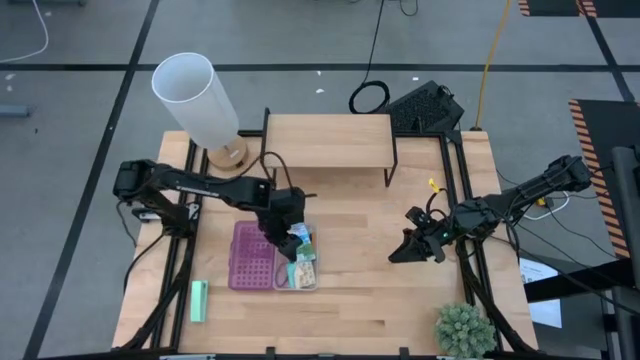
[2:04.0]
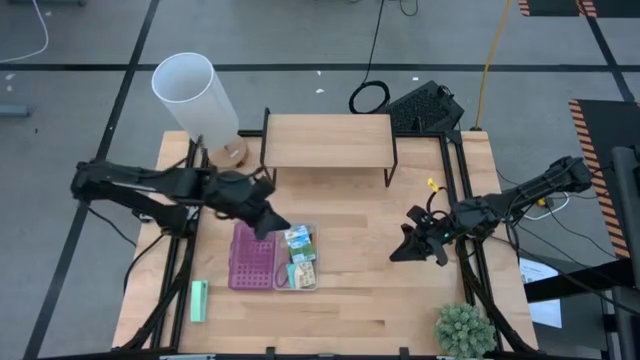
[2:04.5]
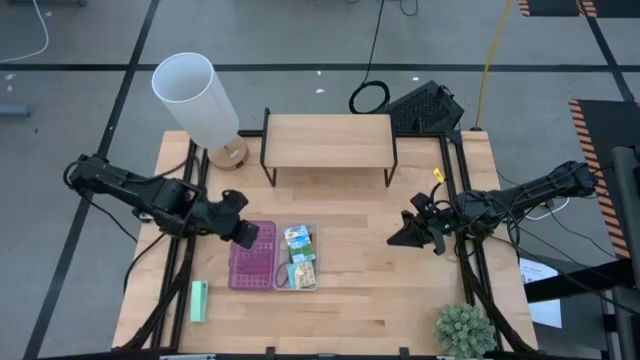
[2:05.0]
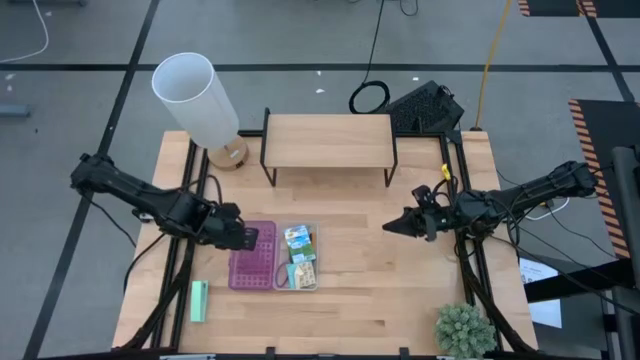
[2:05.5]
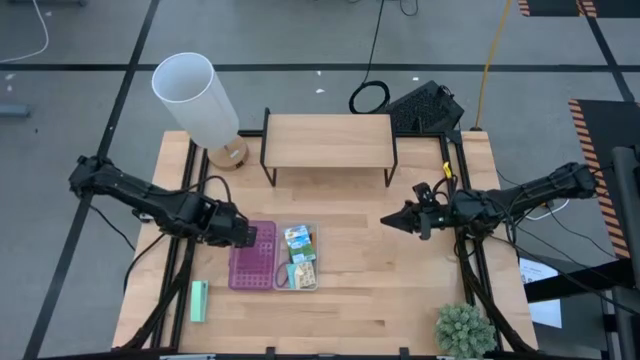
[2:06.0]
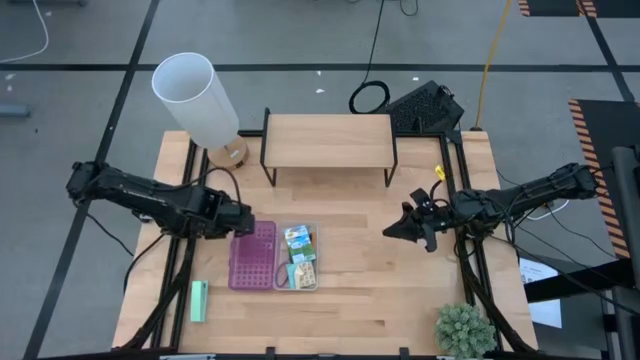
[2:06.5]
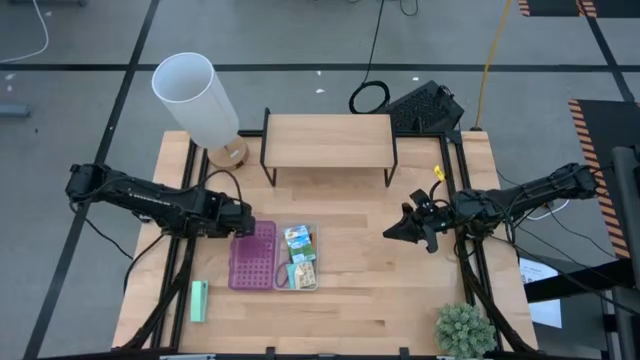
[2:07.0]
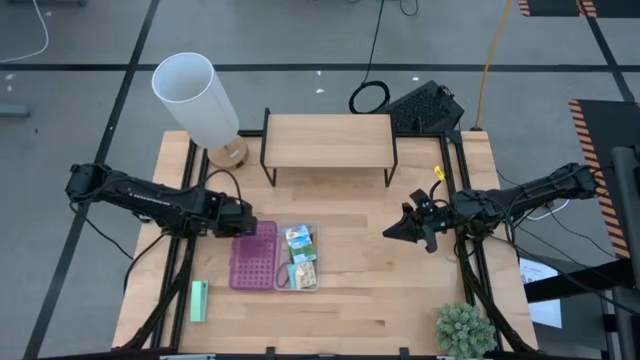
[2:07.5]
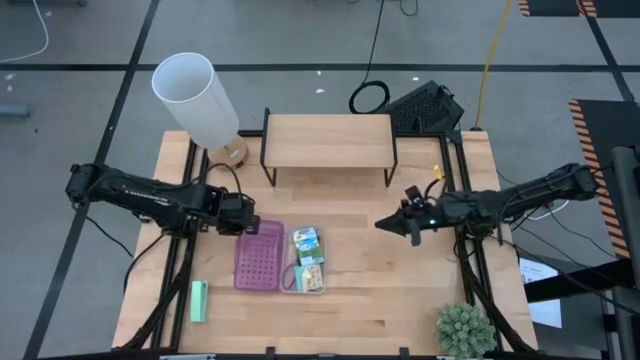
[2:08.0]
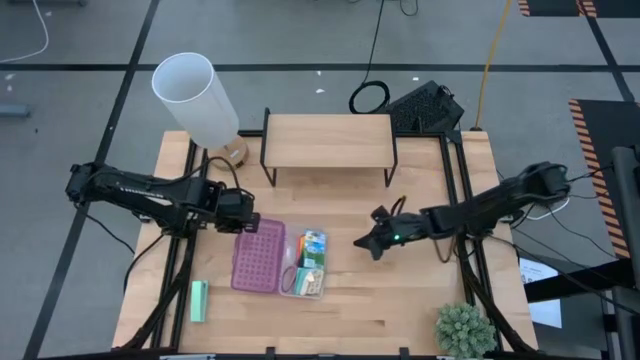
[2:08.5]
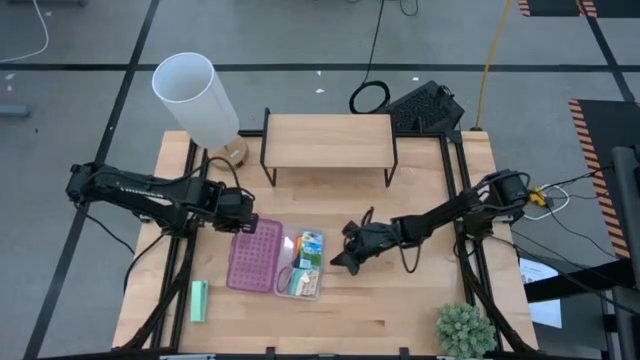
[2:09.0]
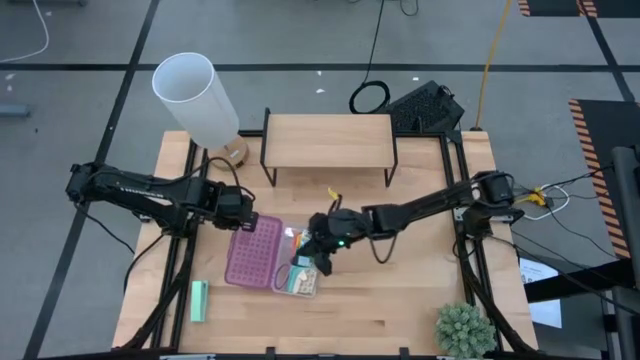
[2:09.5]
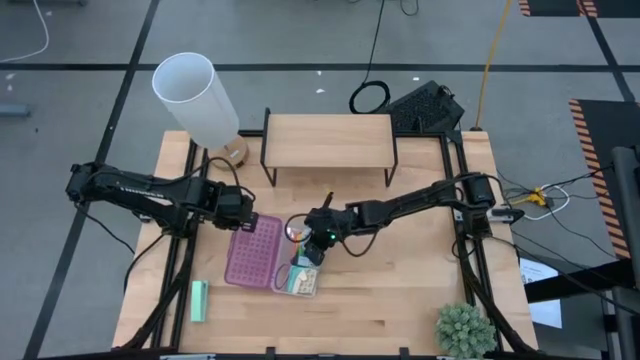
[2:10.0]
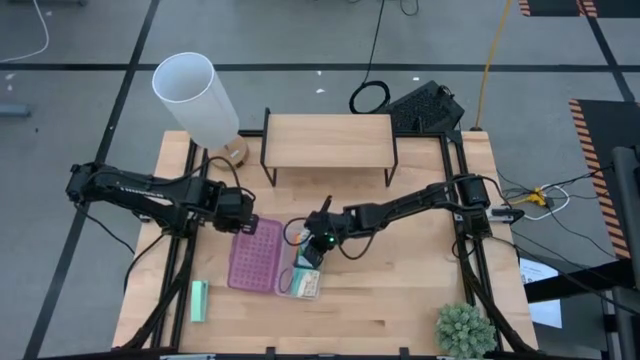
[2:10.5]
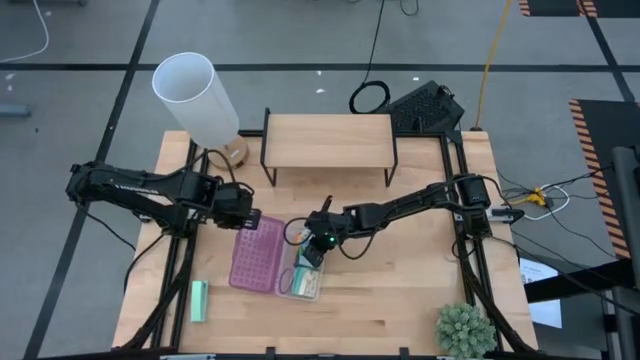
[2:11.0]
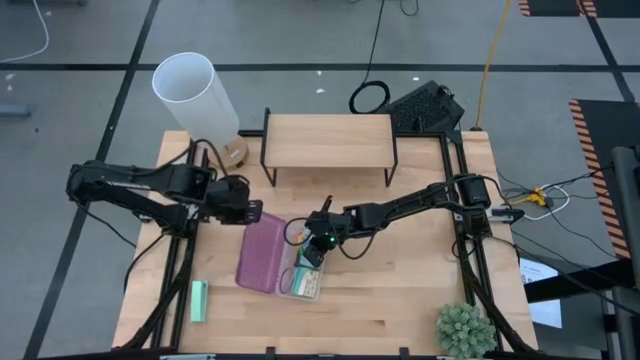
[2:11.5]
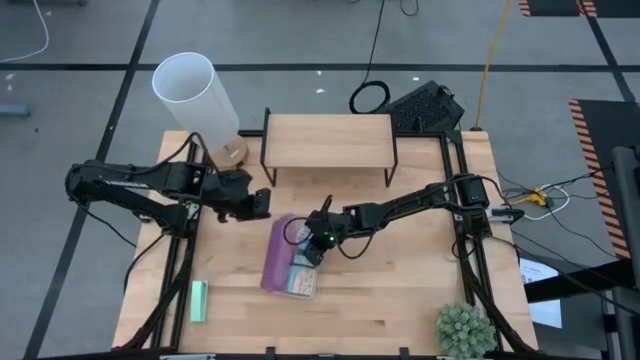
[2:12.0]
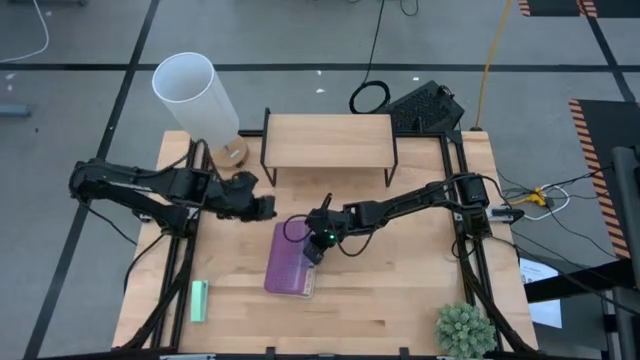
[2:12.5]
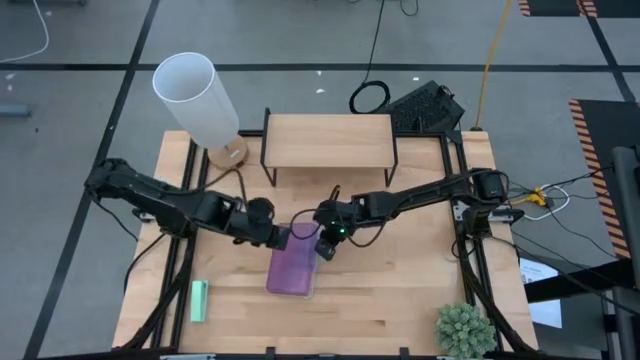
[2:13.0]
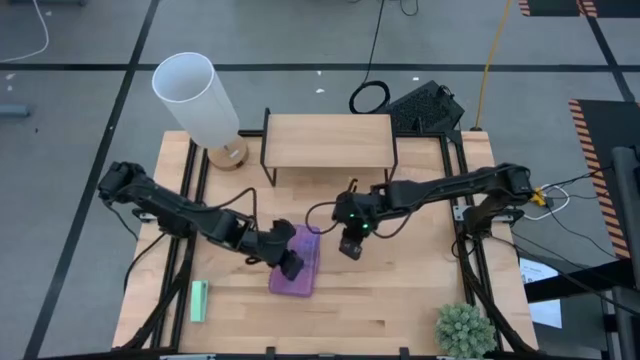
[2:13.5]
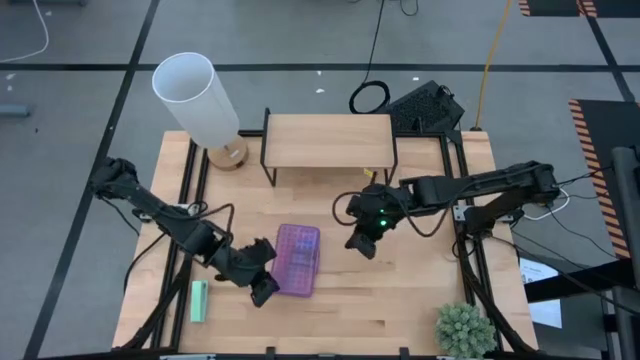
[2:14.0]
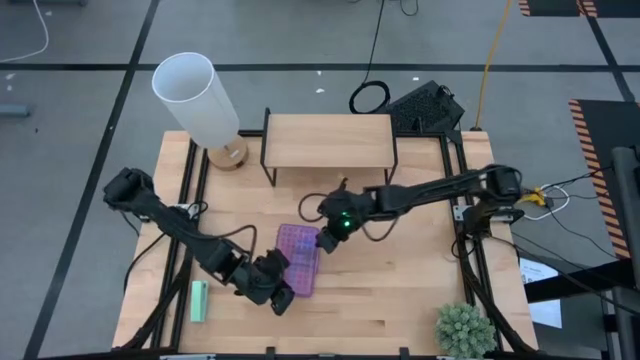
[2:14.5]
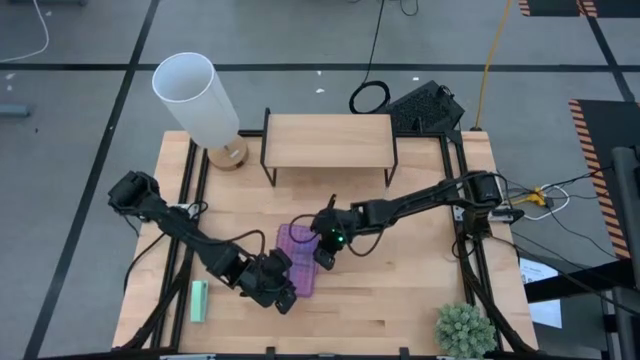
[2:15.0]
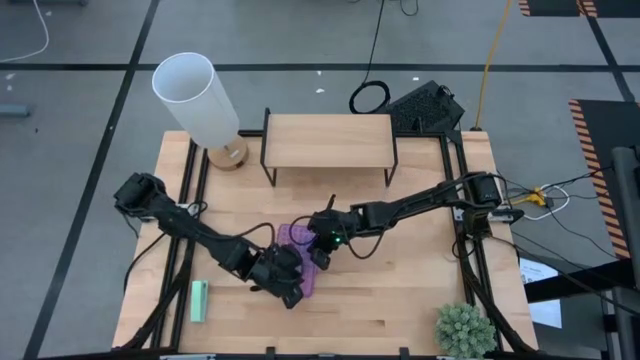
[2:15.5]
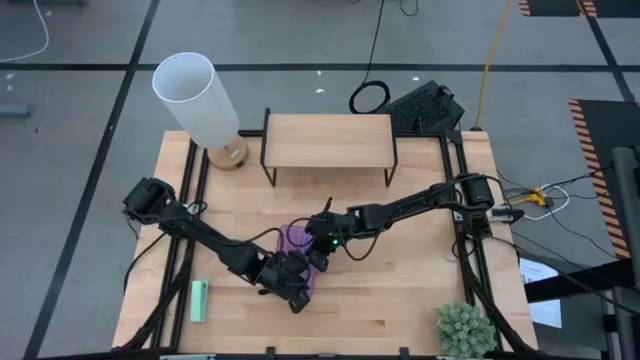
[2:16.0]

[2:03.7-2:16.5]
Task: Pack school essentials
Close the violet supply box
